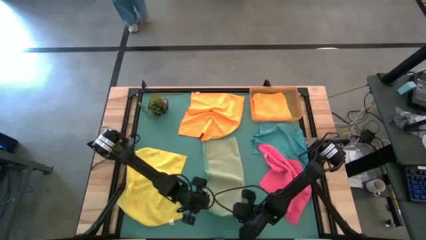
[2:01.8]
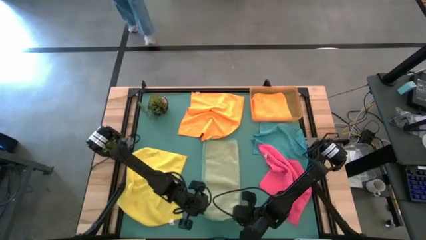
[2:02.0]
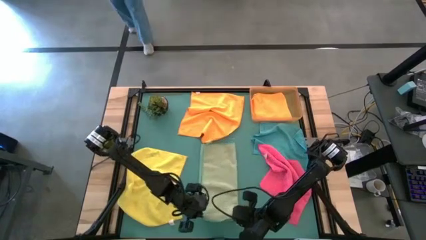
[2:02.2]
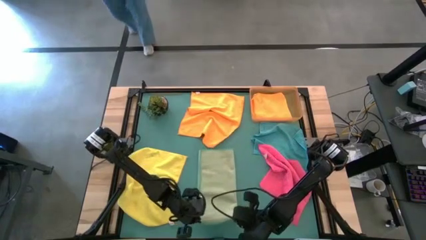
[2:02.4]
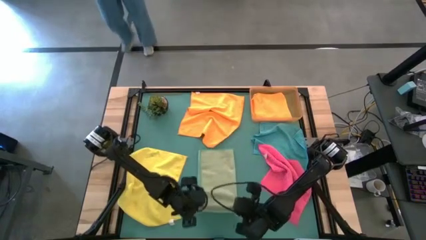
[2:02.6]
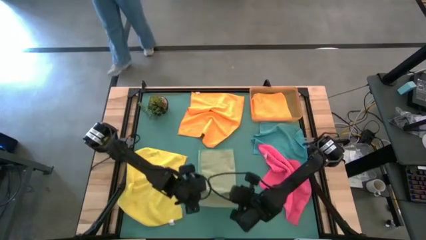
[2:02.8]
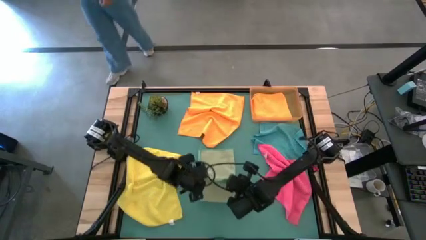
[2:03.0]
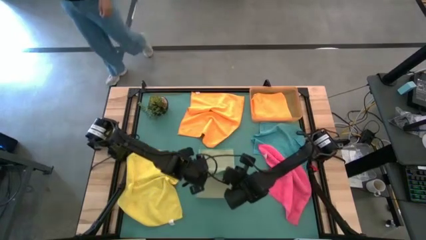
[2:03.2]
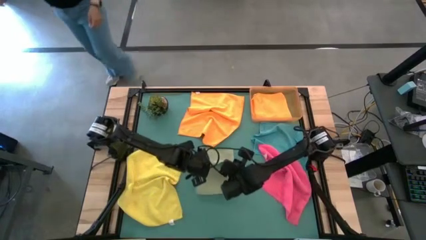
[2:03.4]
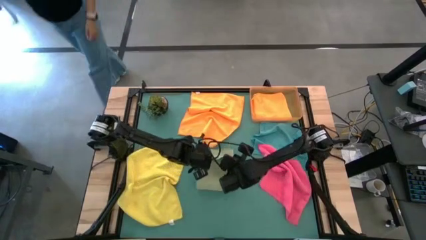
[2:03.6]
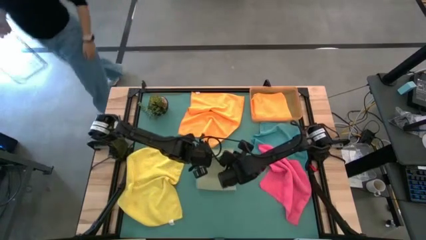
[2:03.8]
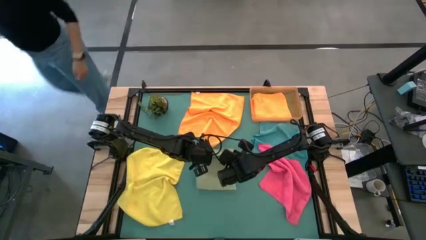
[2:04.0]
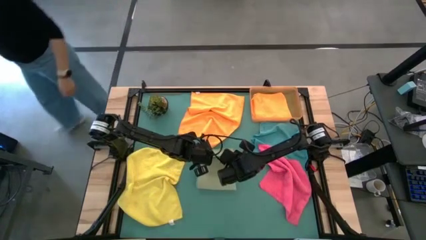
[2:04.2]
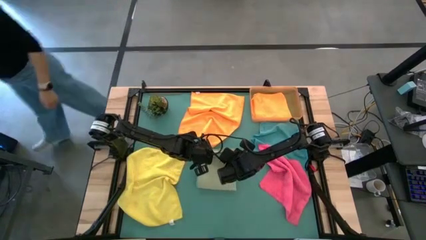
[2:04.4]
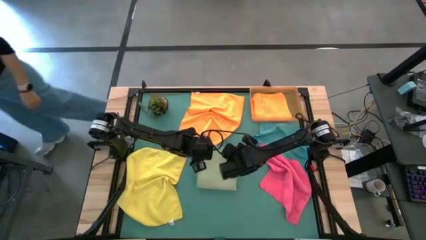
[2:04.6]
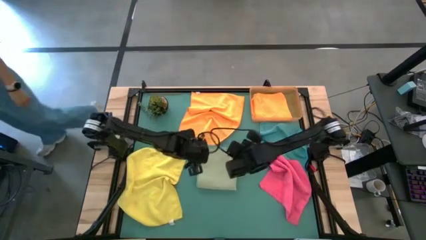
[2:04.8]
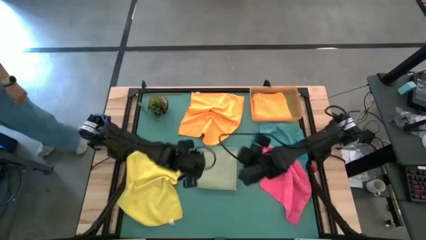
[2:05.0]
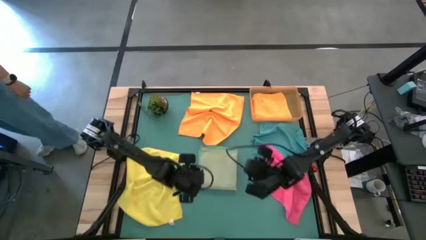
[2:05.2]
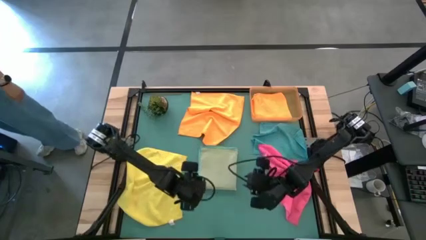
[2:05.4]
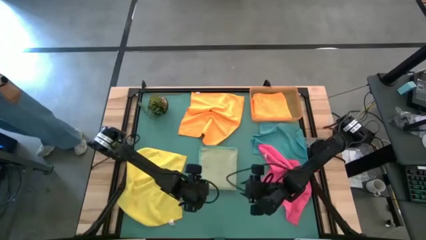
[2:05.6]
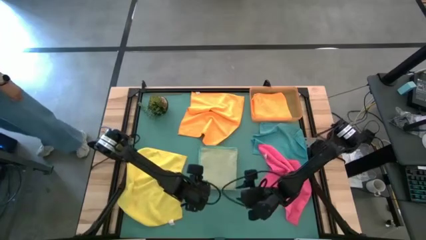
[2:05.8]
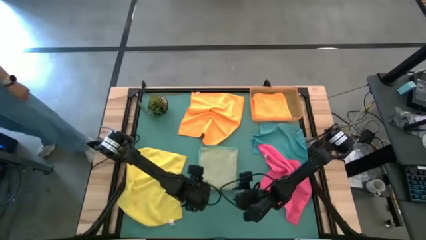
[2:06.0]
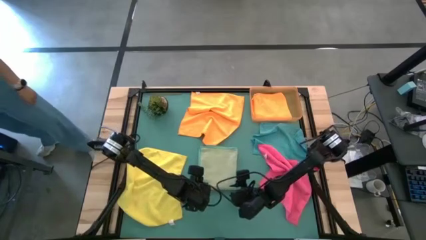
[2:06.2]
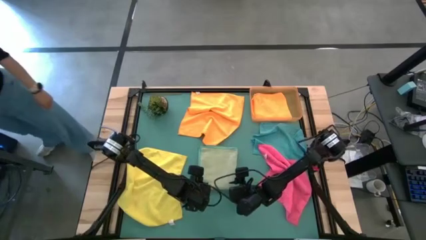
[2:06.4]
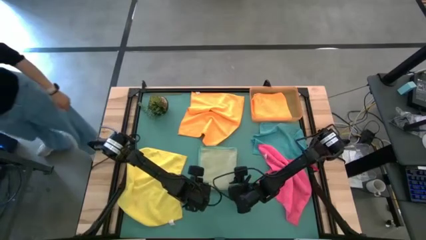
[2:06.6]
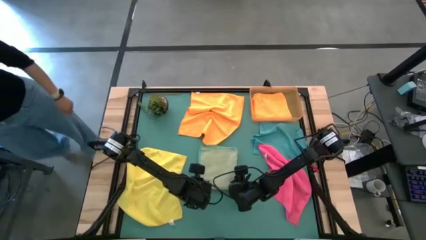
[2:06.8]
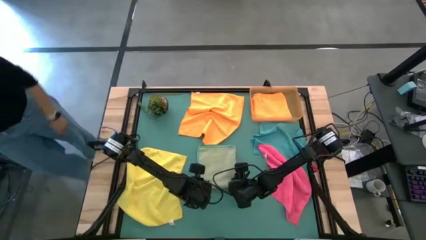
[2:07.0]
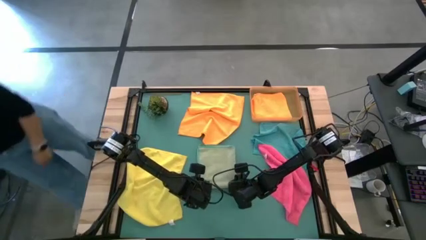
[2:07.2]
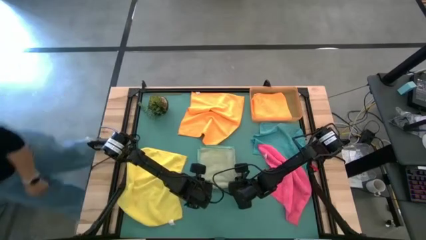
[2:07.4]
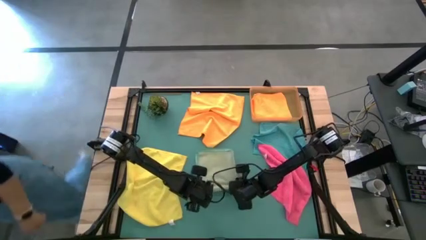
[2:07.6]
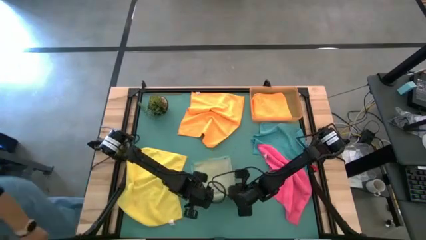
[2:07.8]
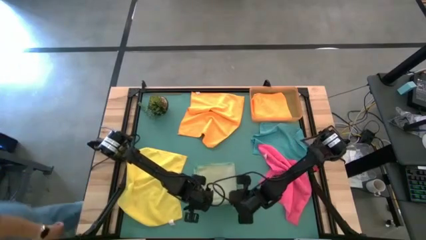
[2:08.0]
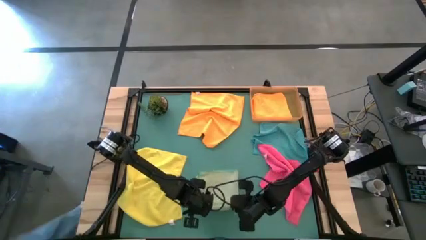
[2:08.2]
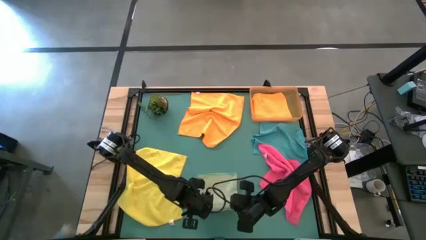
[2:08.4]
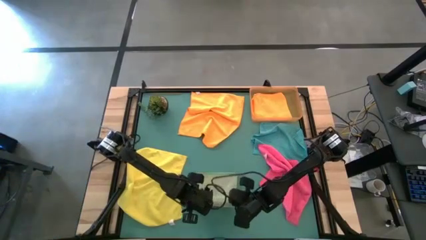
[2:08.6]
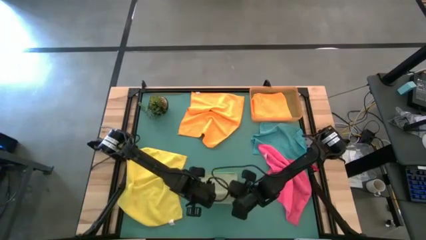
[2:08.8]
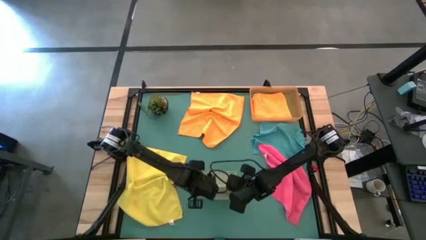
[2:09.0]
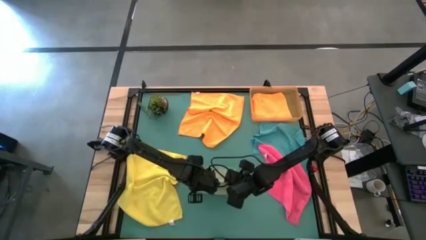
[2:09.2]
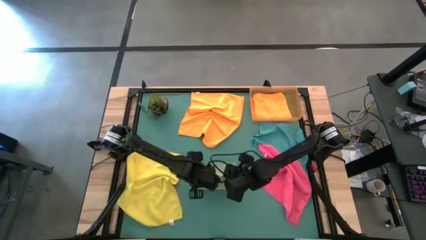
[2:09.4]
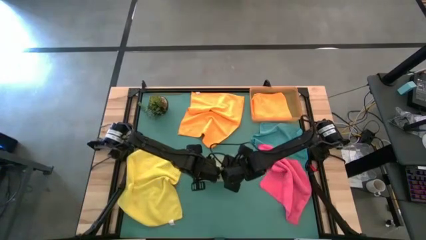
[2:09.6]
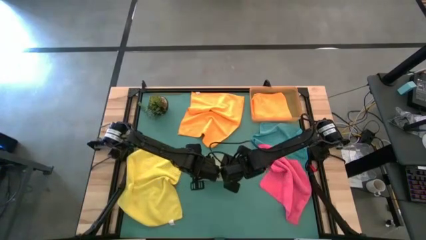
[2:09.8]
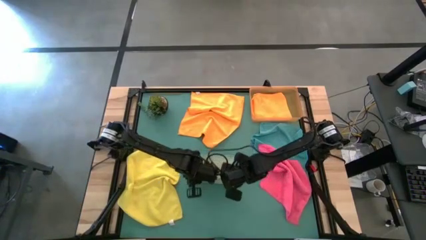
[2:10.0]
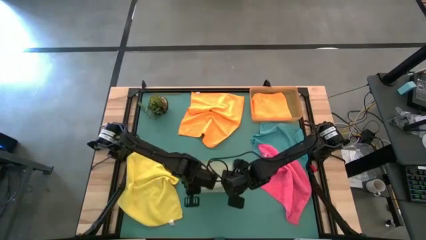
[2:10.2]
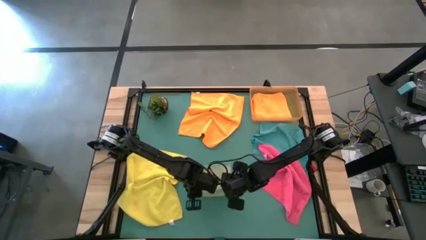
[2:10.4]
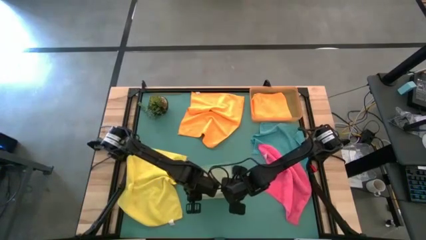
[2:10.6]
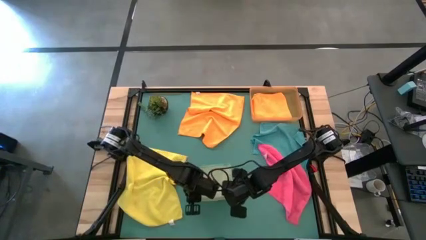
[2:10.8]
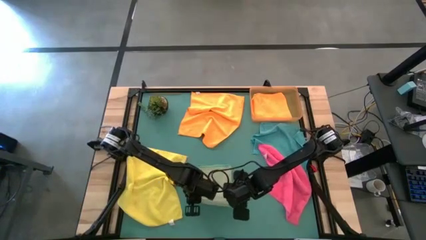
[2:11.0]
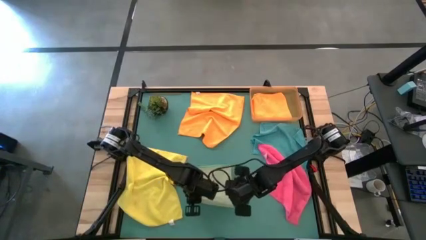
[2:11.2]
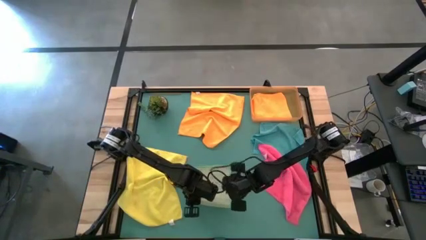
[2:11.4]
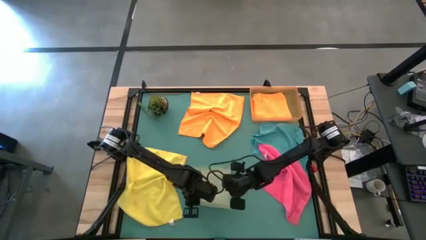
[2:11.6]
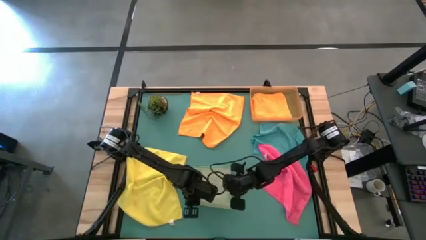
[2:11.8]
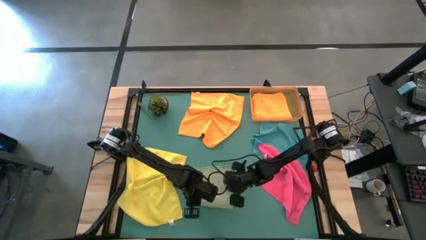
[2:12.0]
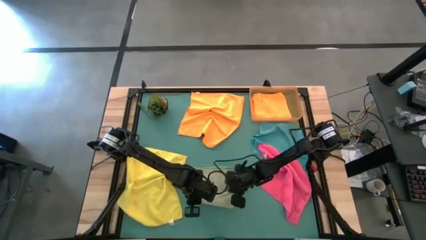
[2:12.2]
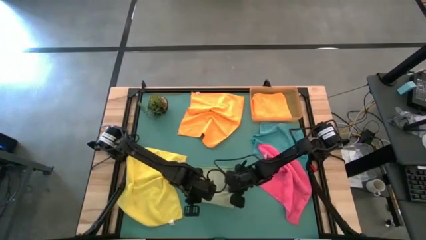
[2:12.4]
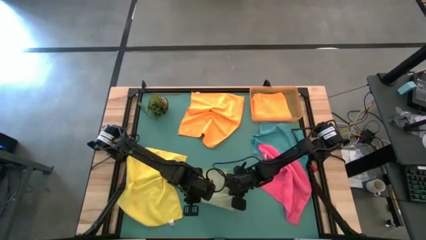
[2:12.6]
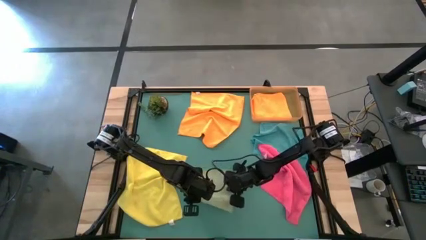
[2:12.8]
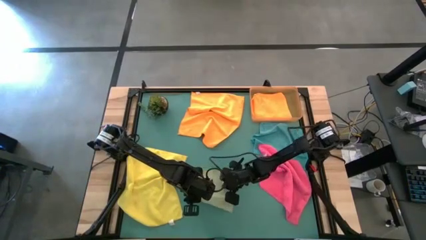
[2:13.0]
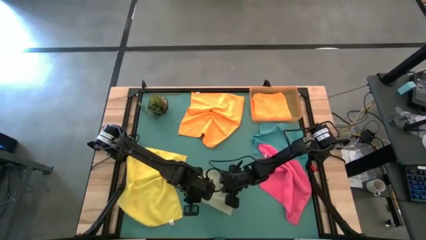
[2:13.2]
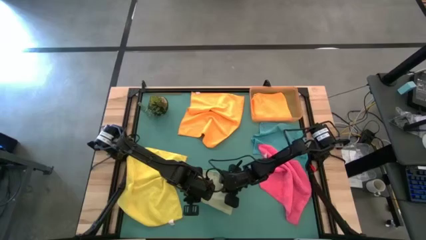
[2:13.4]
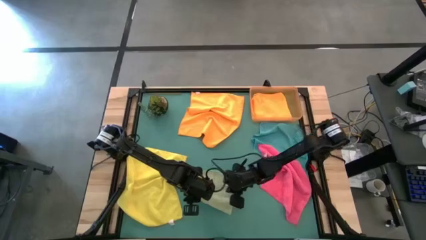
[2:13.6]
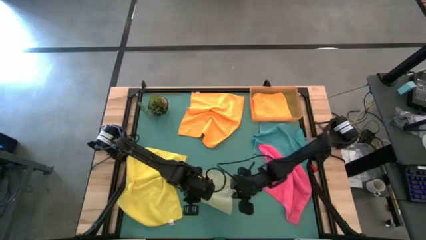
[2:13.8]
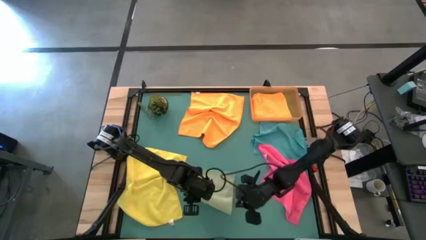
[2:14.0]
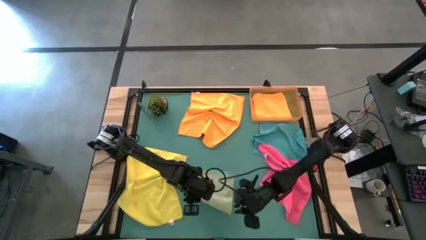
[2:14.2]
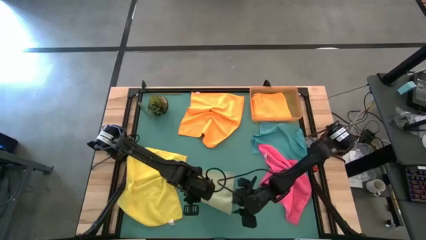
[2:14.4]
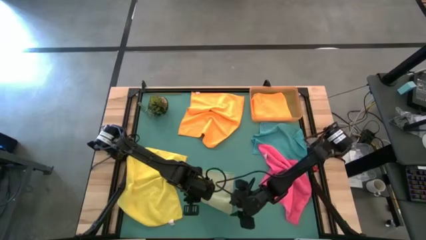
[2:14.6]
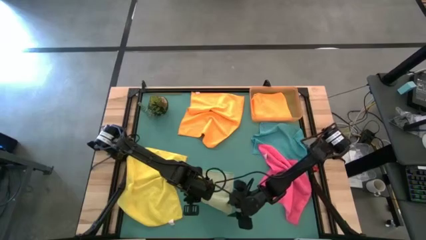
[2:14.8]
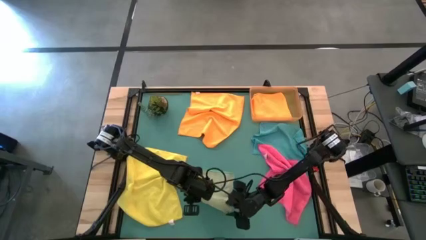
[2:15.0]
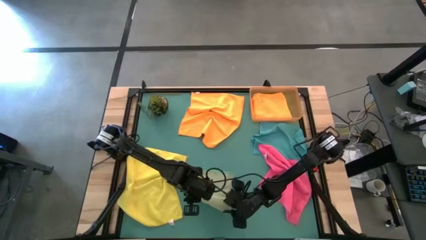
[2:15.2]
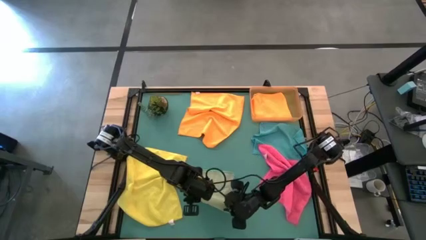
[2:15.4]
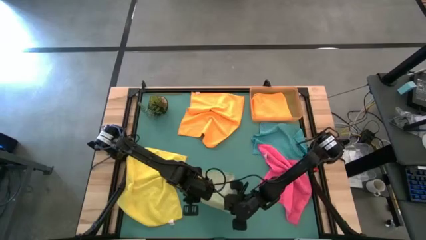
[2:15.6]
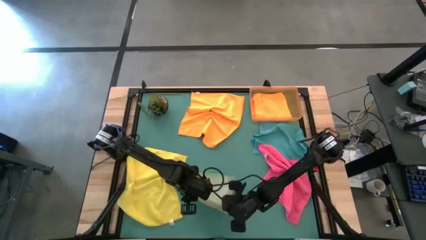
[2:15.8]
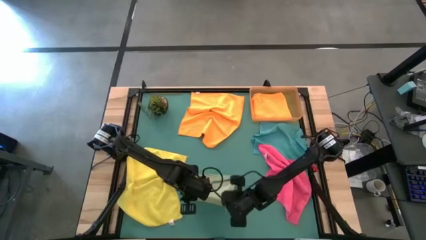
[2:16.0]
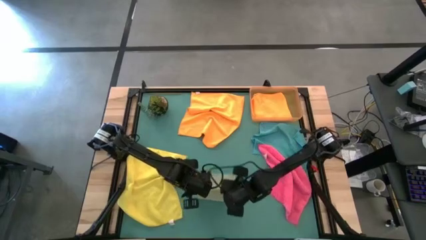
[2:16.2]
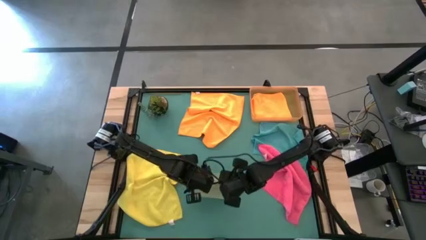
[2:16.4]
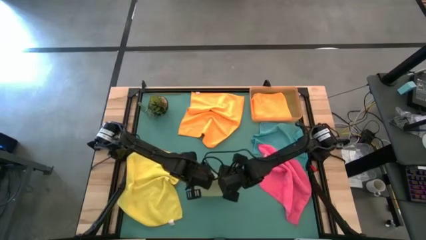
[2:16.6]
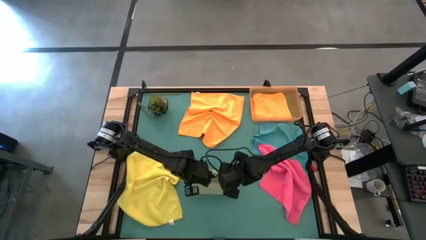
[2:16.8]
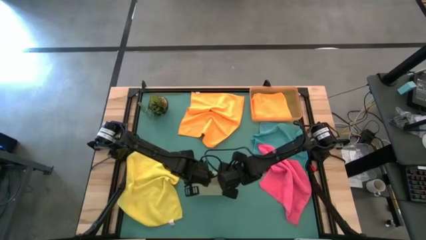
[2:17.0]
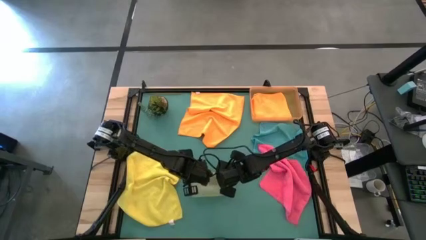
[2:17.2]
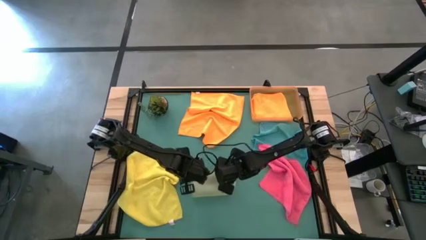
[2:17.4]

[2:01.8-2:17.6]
Task: Fold microfiber towels
Fold the light green microfiber towel
